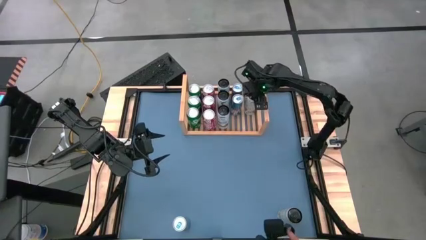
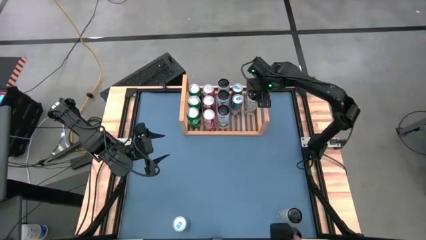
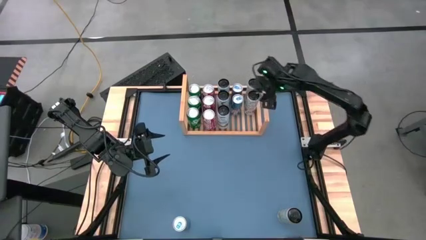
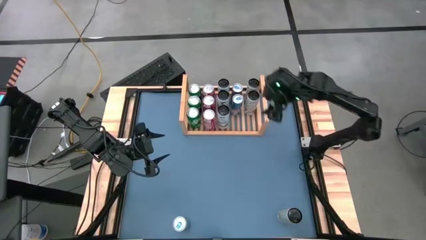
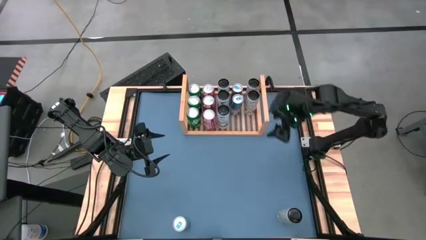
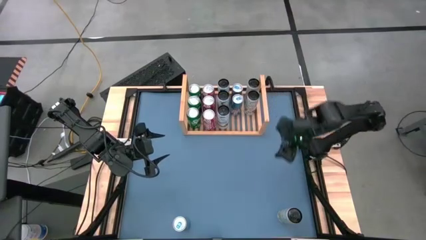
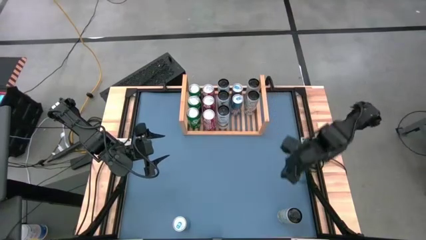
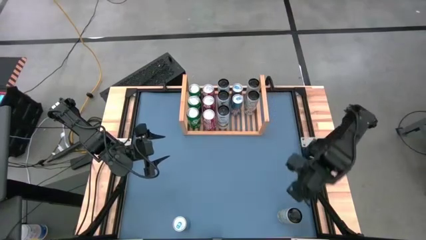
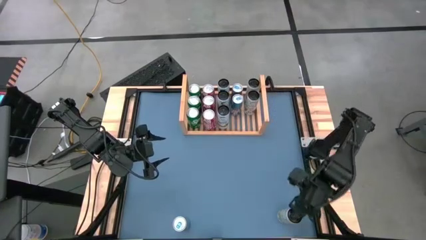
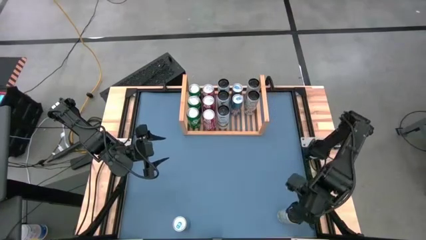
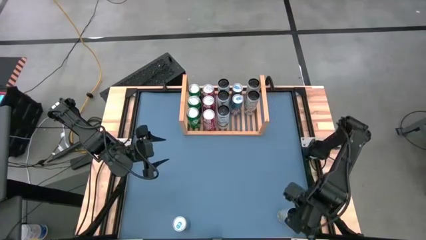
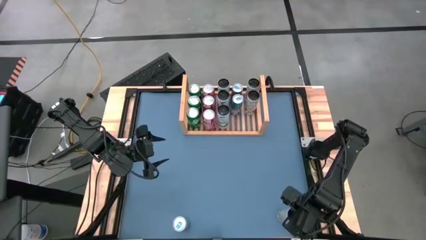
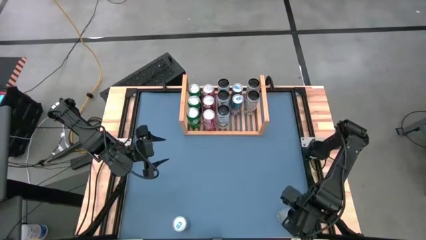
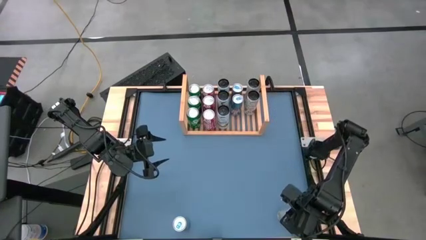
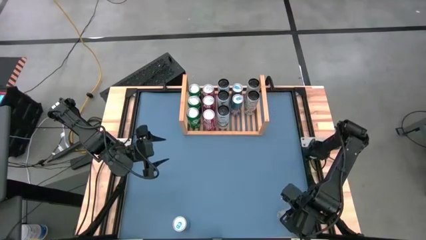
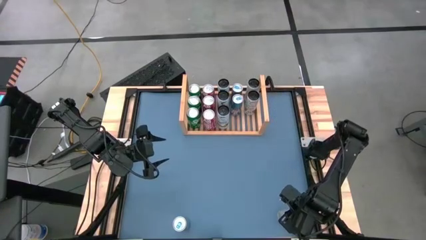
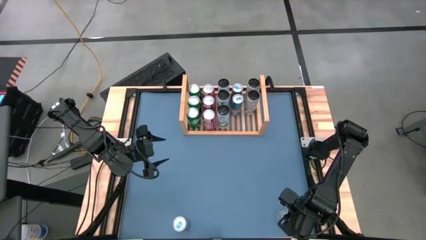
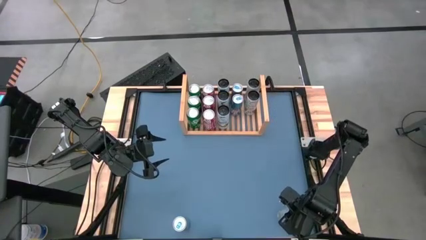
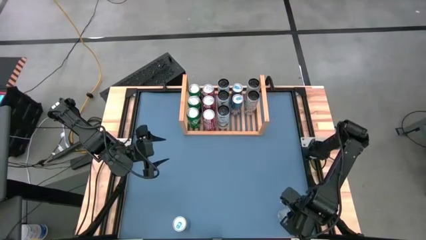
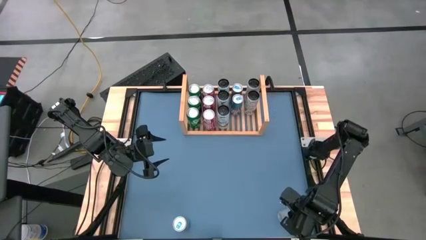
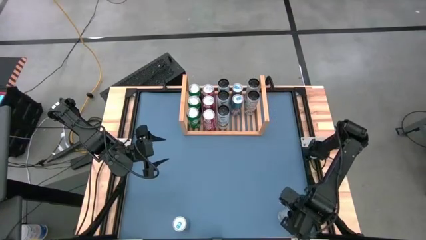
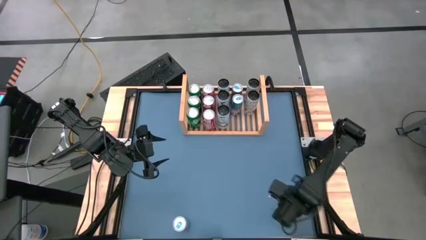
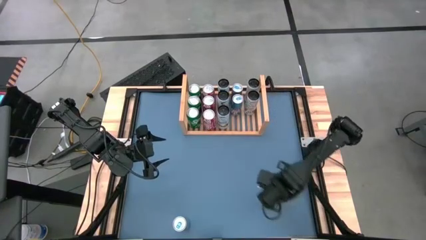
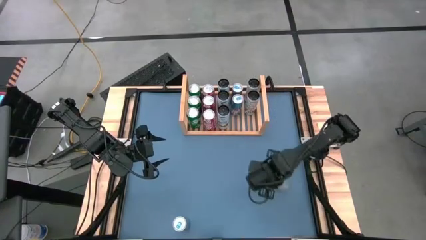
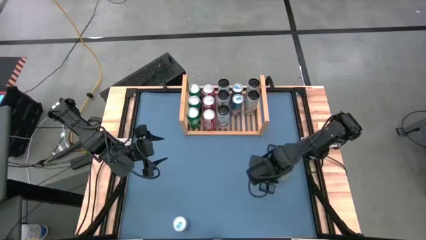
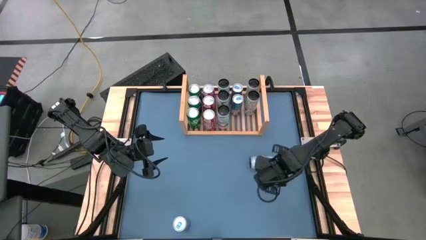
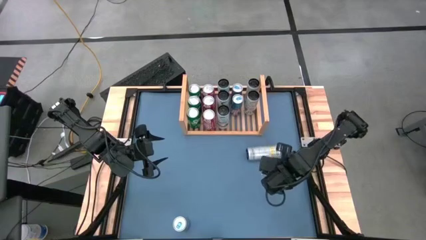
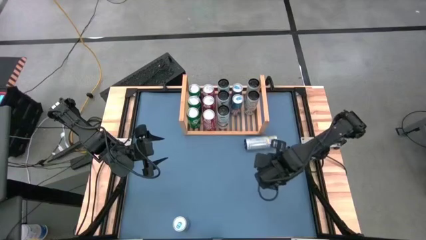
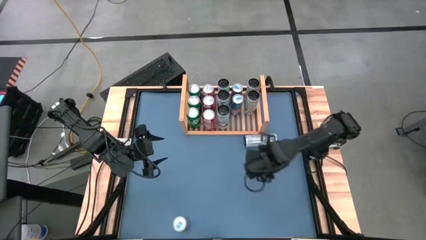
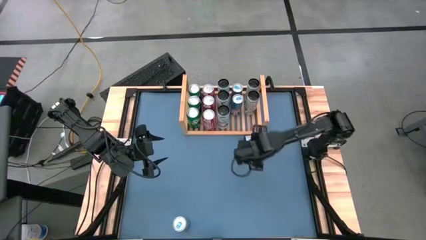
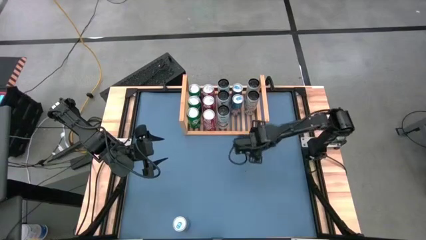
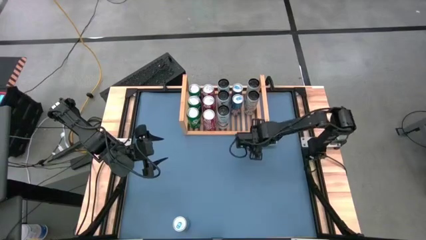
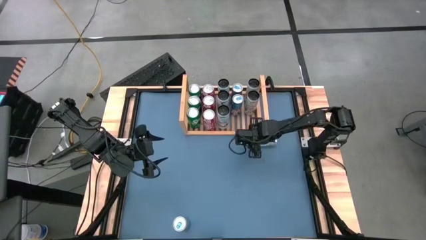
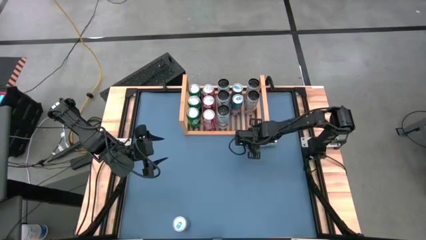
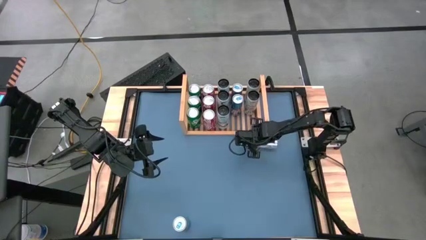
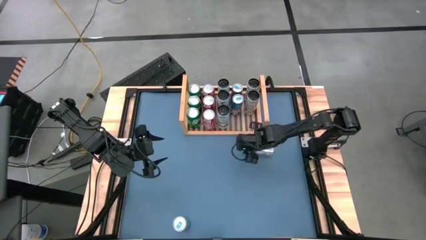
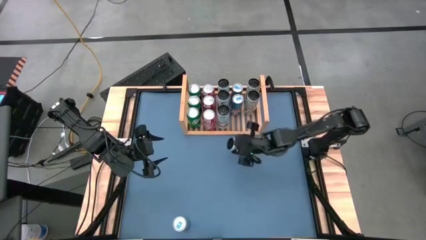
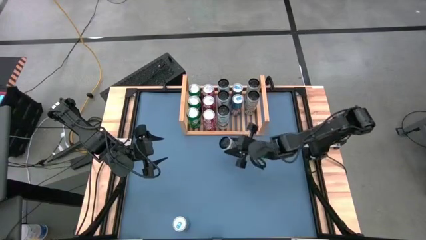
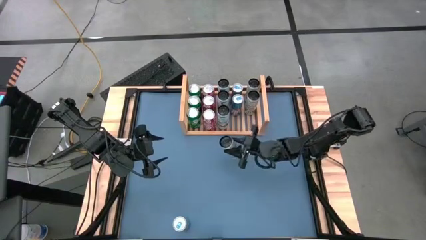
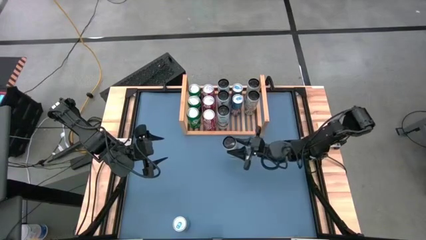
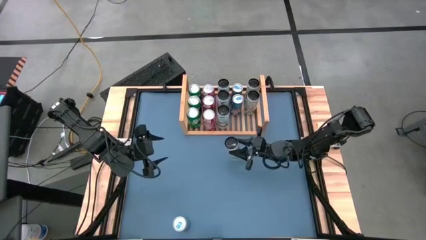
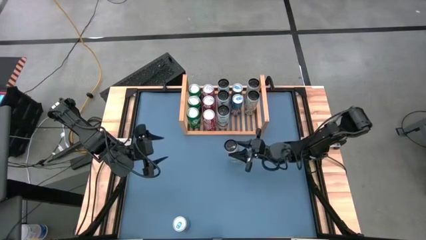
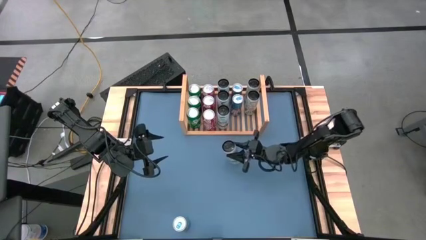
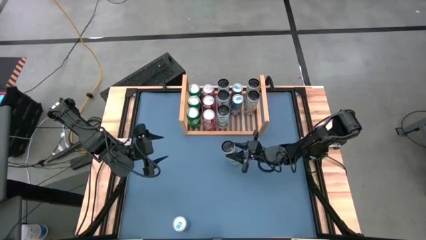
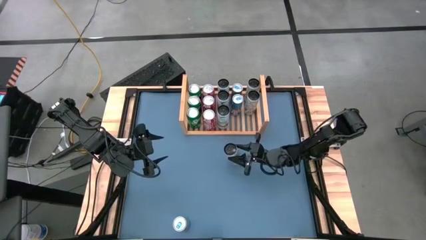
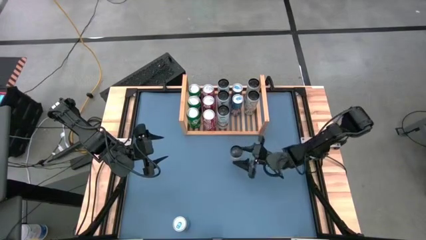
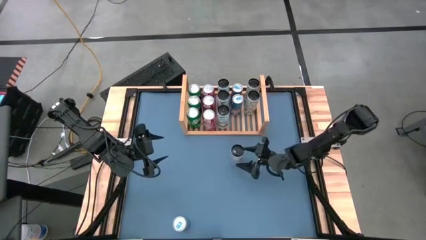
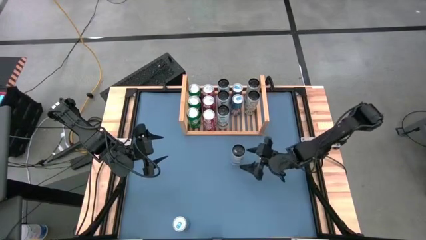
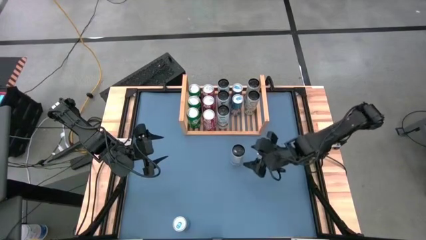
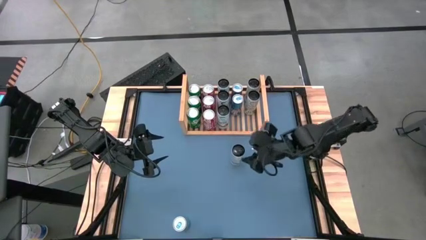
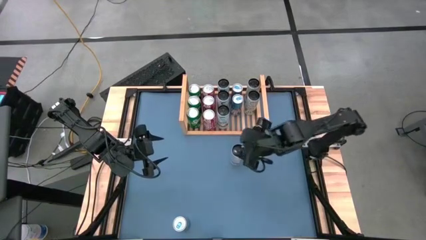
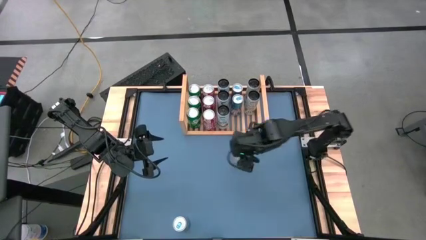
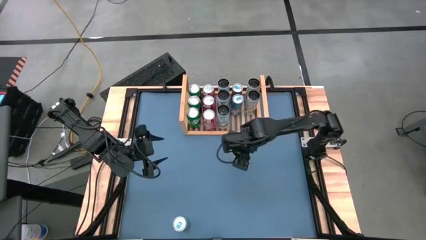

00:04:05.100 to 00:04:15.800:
Task: Place canned beverage on shelf
Put the bottom right white-yellow can aligned with the white yellow soda on the shelf

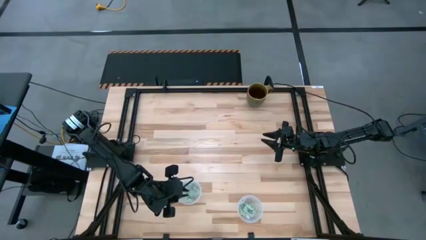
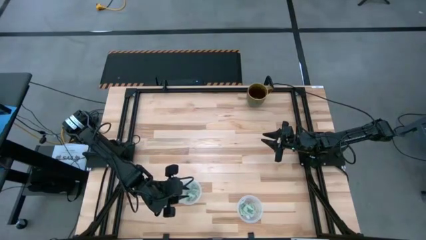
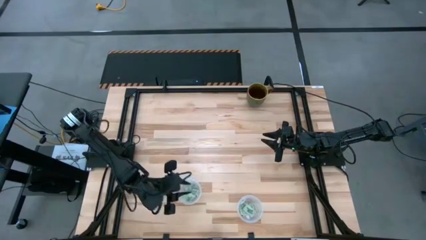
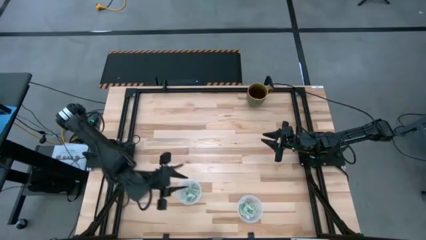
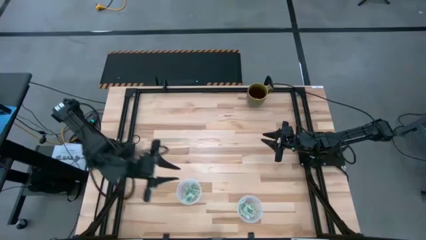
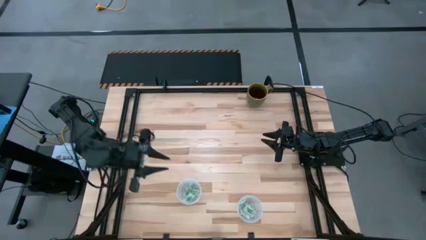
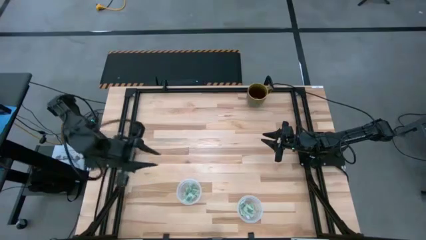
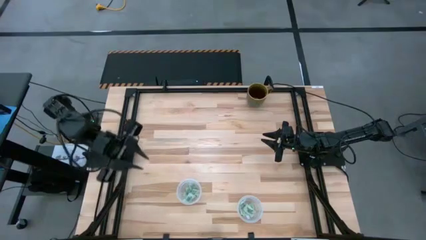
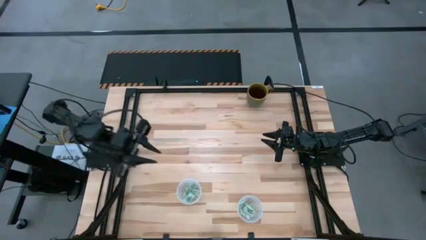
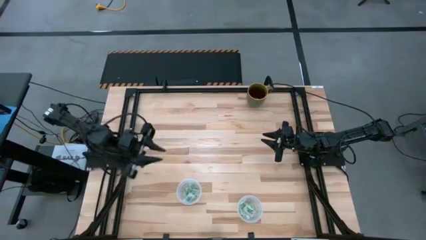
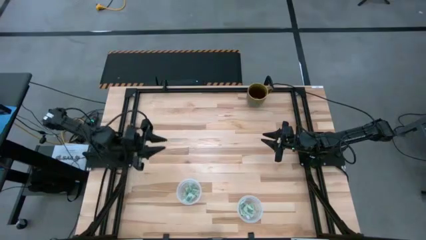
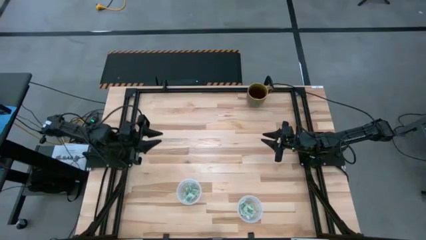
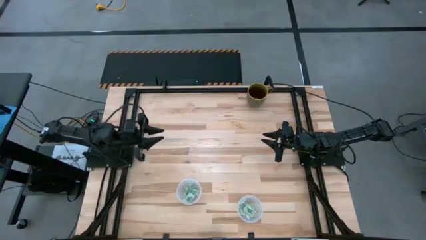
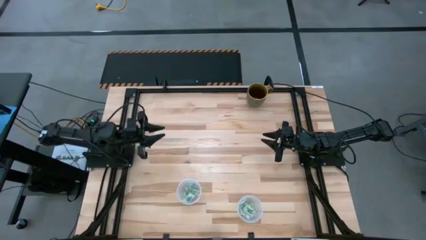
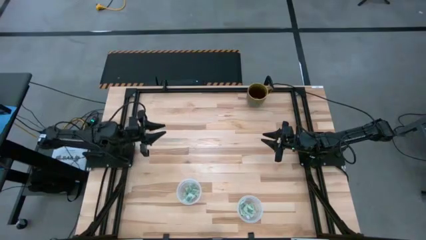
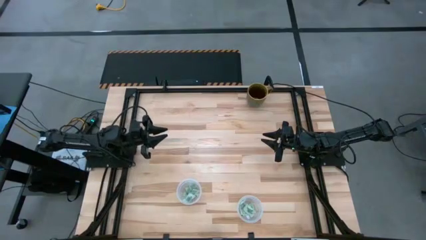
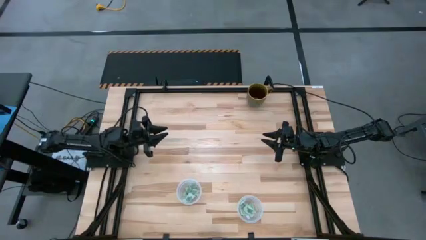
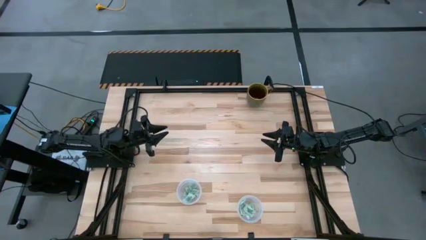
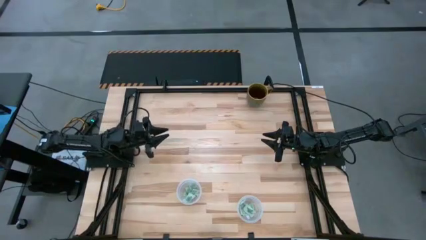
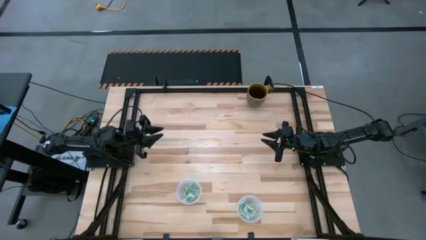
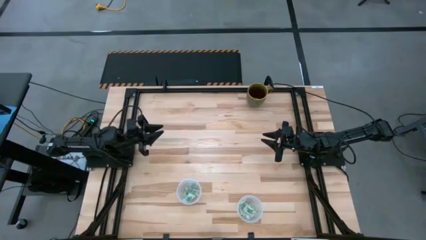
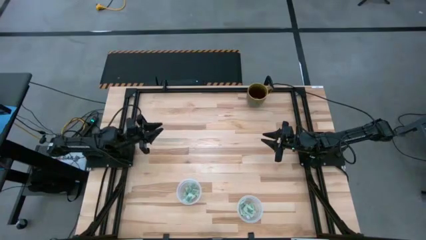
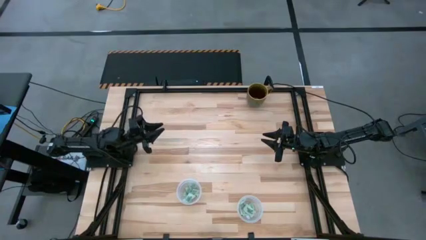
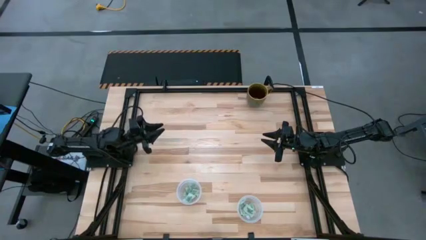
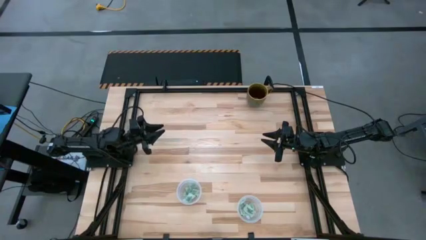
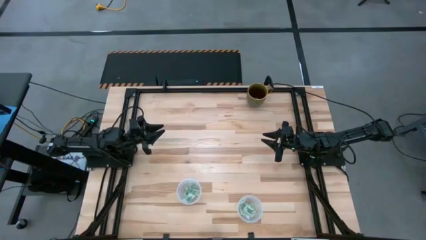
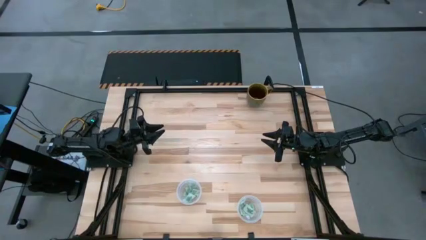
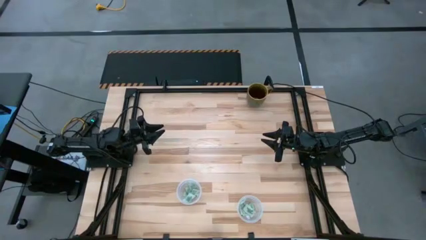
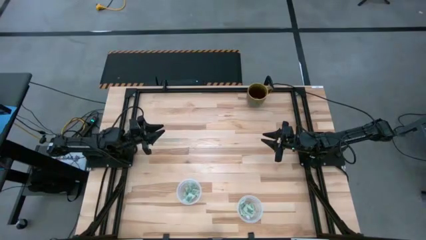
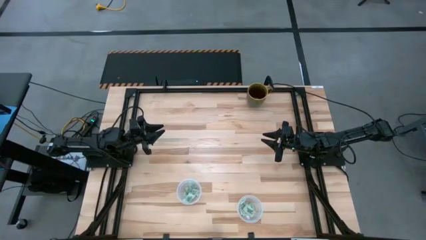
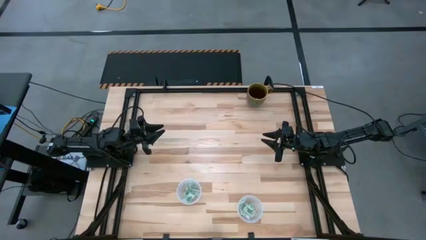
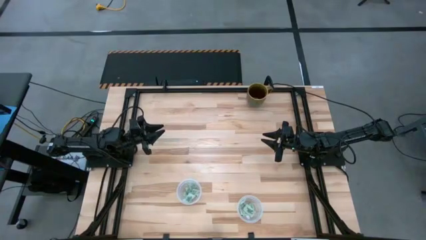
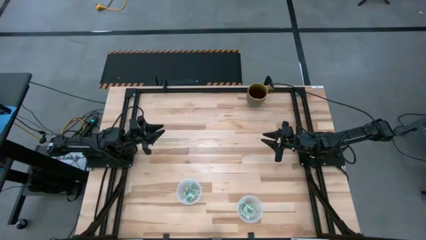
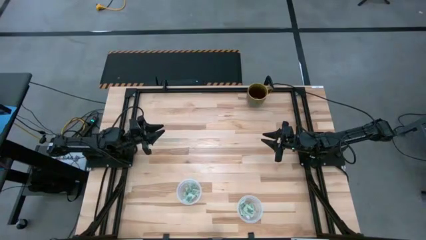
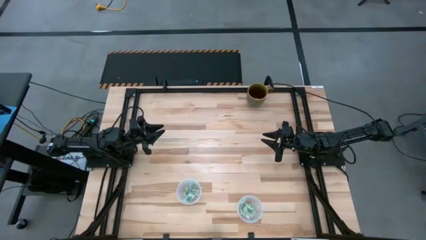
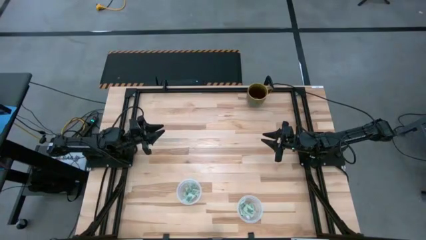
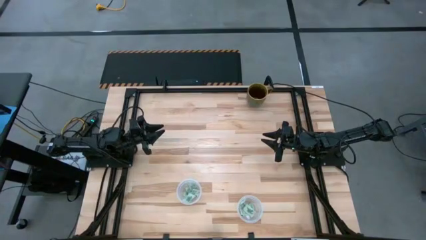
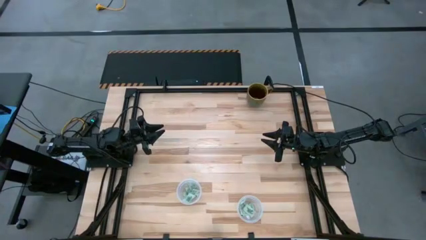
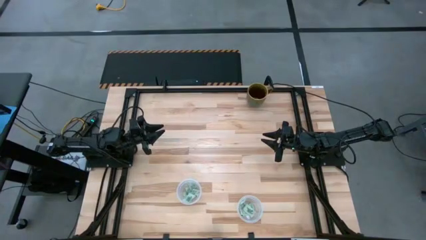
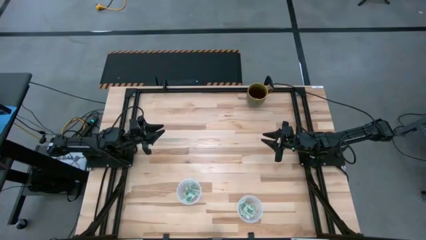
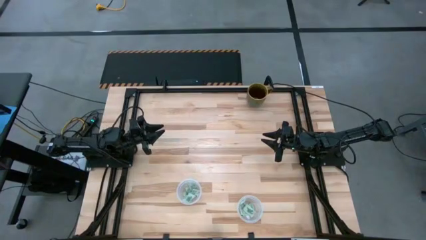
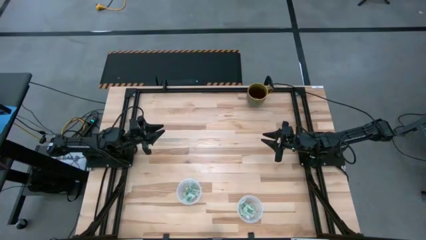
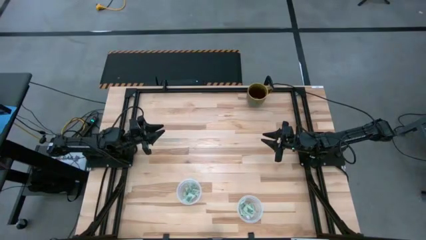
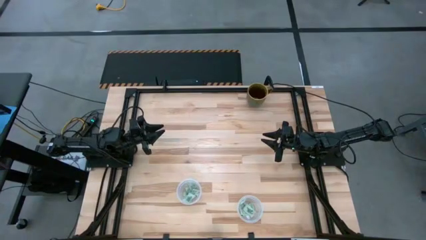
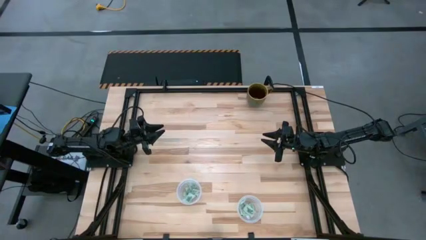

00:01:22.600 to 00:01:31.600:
Task: Pick and place items into bin
Return to Home Position
